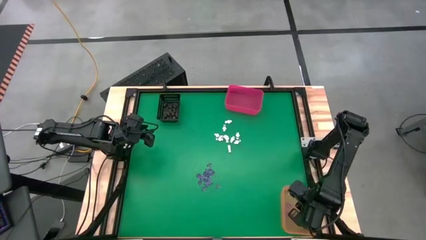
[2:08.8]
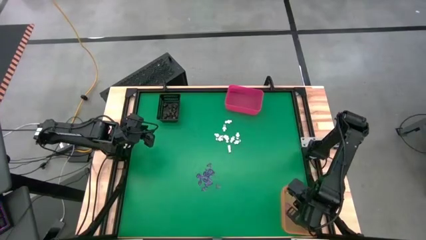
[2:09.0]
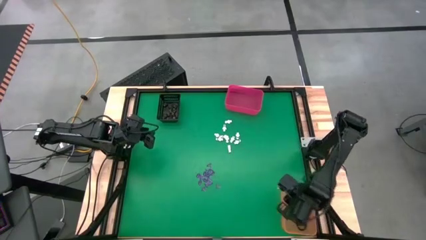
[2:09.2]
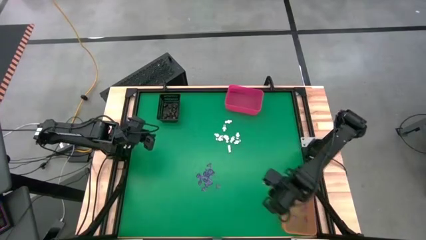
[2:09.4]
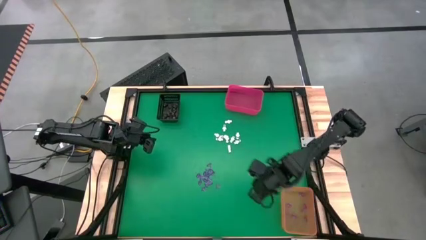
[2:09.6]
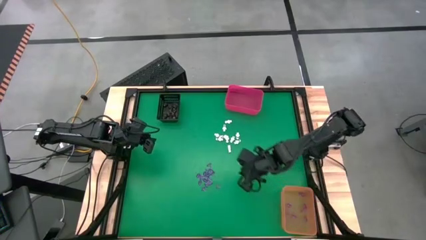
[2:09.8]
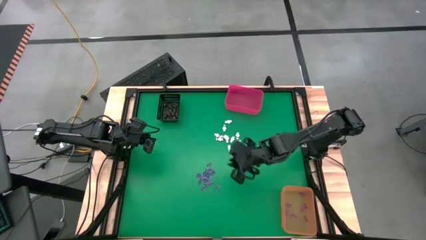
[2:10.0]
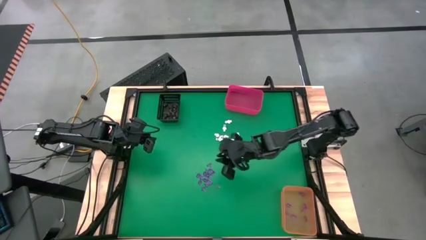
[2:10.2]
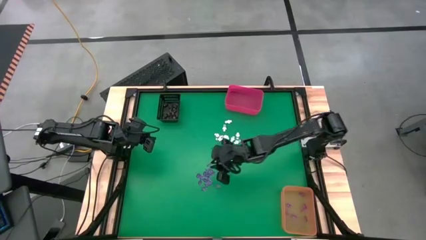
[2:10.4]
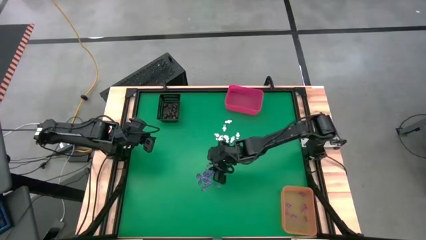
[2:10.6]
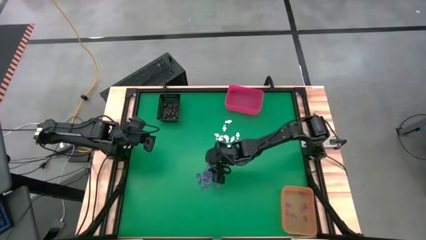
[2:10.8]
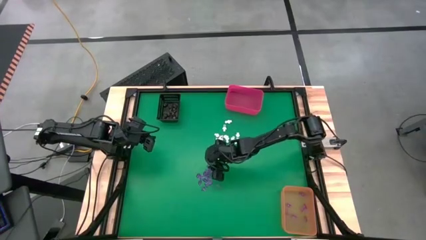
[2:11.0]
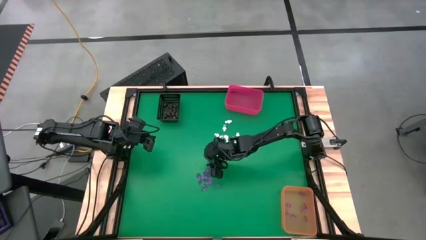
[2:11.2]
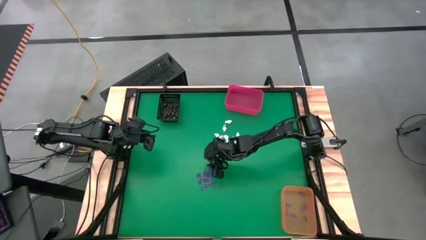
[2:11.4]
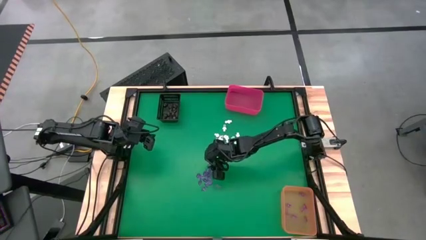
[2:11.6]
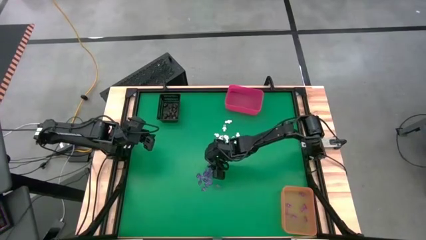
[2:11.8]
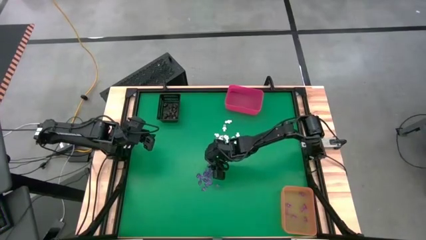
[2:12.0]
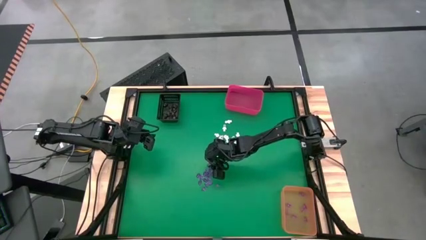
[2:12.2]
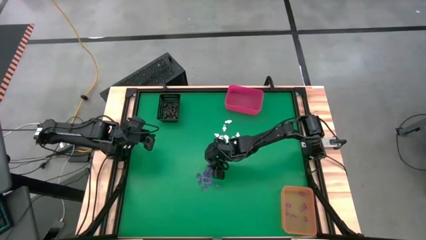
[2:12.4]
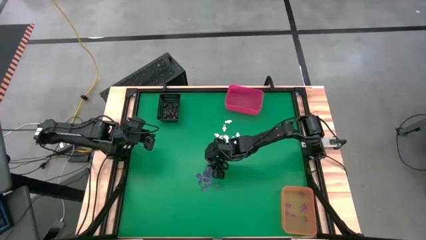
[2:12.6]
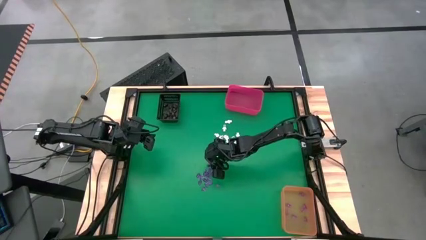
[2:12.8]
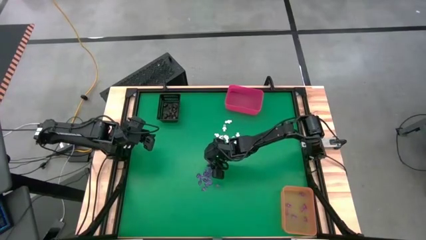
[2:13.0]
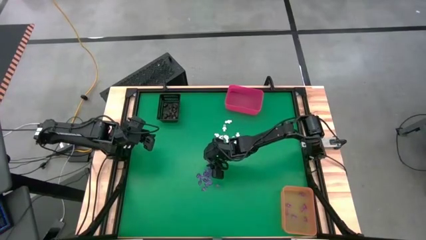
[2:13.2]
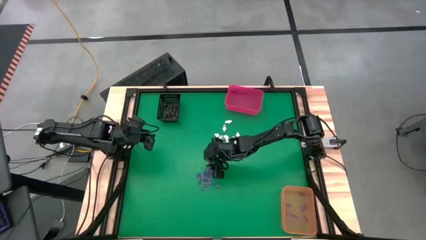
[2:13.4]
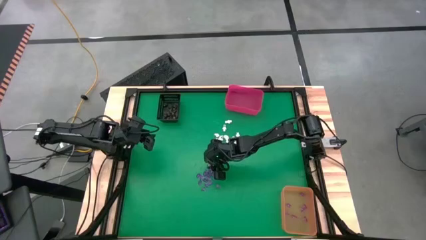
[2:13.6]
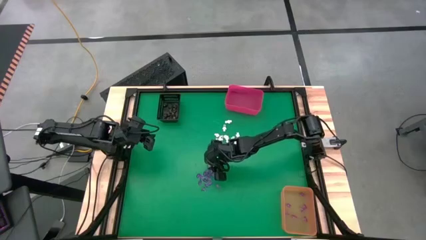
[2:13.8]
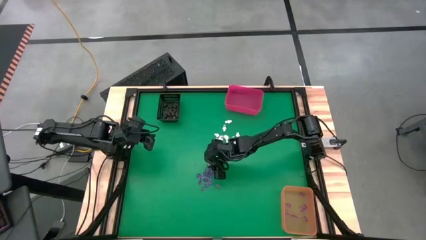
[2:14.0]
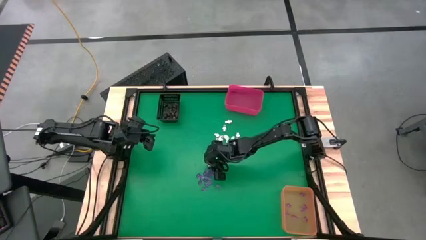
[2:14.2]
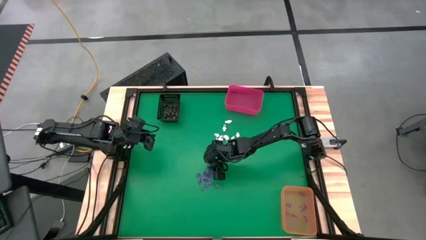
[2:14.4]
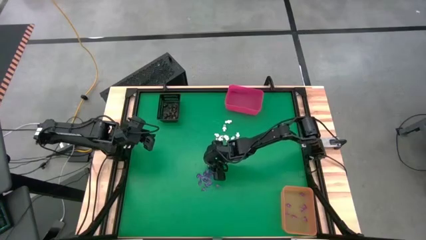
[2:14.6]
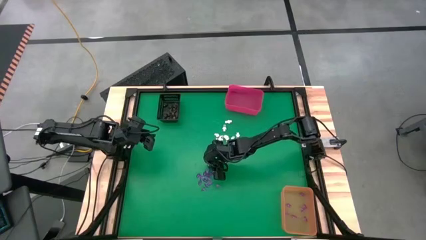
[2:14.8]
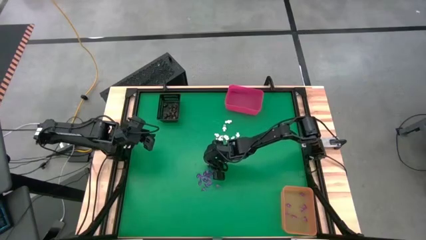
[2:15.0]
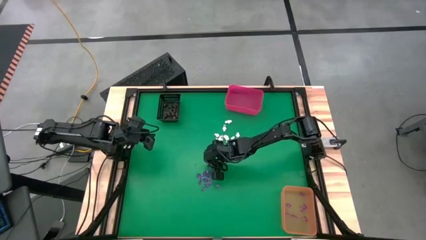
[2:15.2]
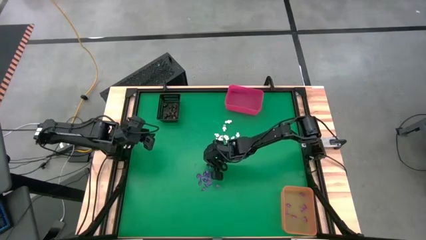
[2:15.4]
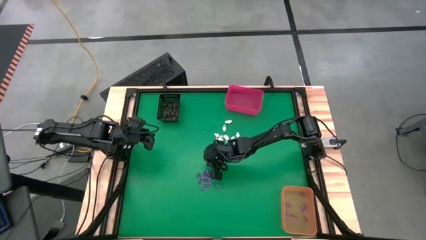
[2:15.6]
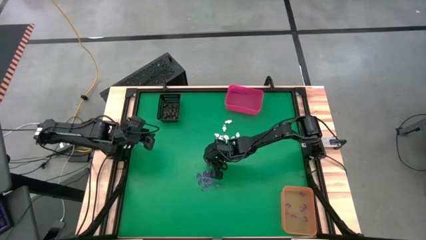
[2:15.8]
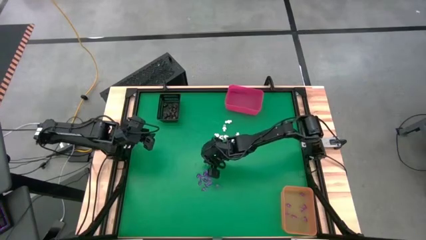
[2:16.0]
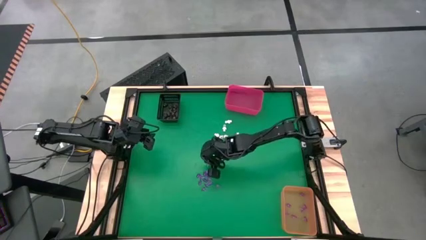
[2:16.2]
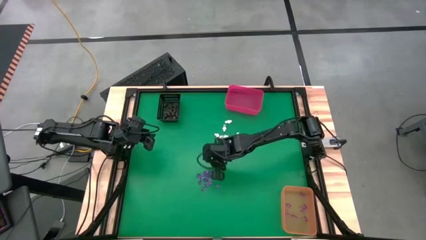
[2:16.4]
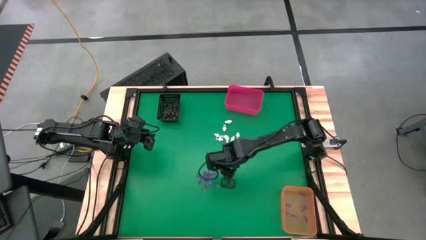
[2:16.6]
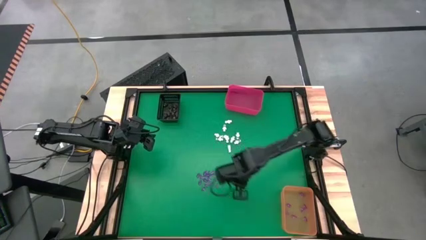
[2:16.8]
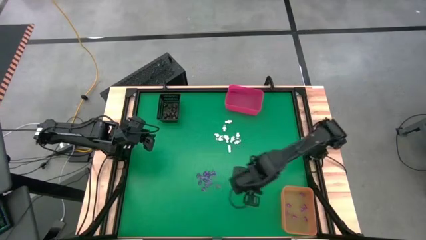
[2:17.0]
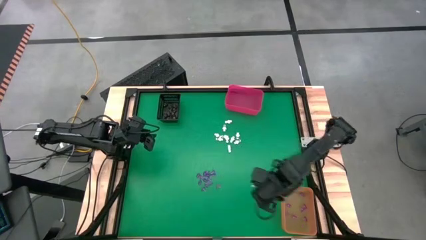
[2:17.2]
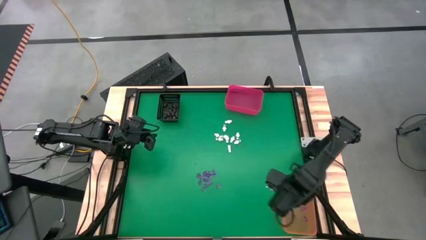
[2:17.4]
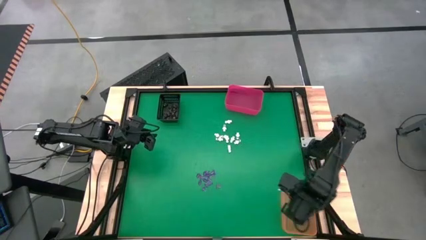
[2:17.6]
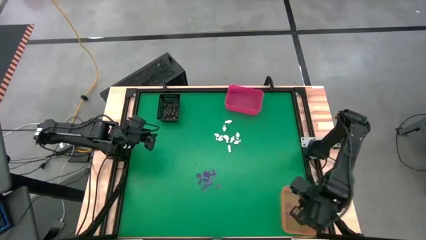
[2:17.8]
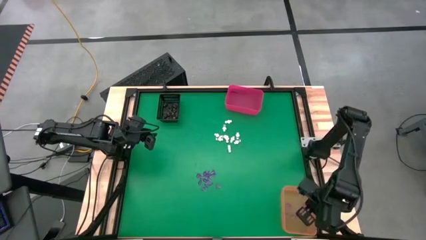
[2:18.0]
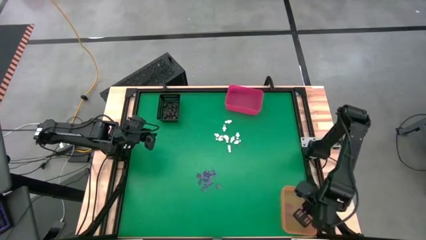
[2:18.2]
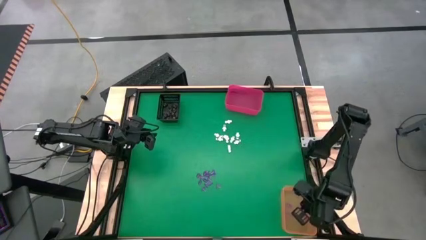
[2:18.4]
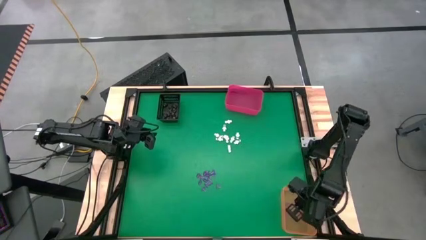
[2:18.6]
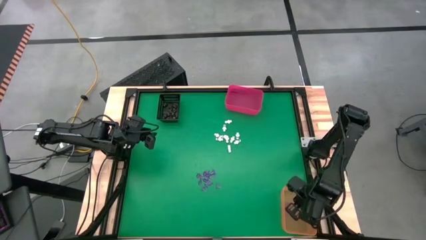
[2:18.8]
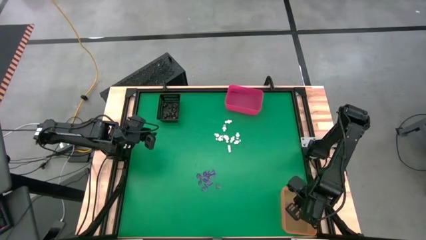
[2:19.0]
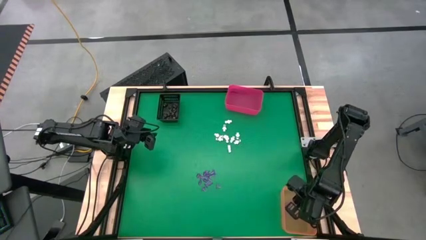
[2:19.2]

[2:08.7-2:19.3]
Task: Sort Halloween decoration
Put the pink witch hat toy into the orange bin

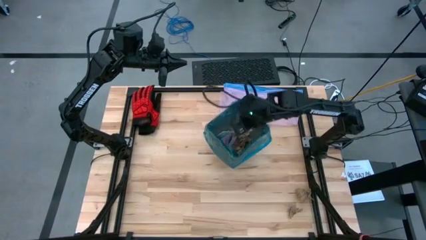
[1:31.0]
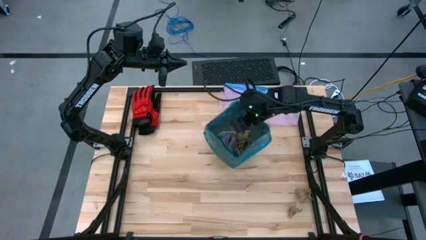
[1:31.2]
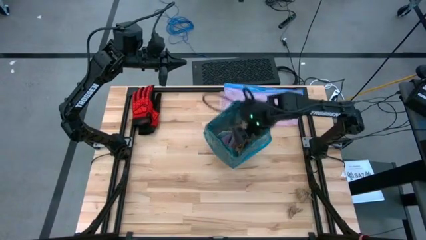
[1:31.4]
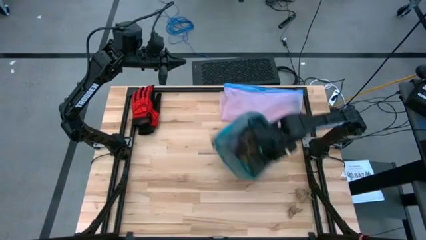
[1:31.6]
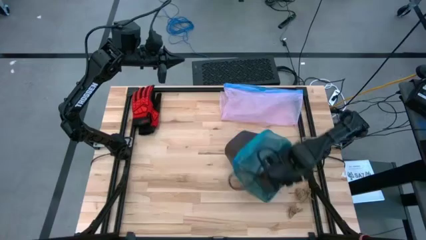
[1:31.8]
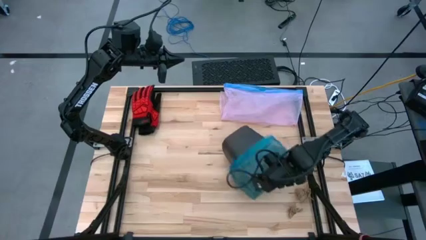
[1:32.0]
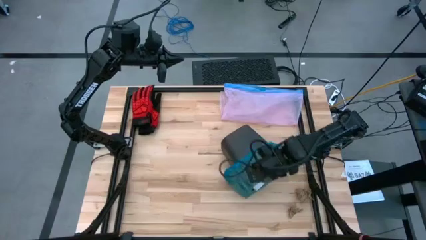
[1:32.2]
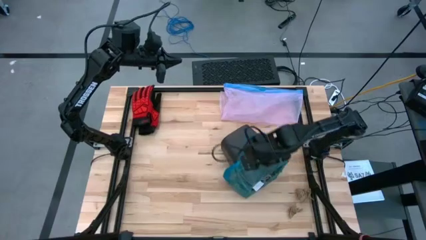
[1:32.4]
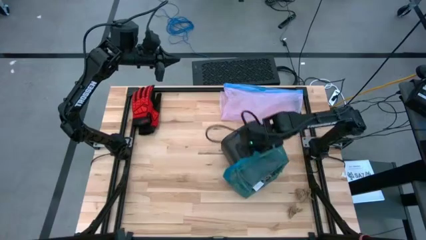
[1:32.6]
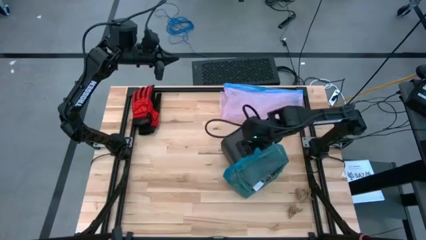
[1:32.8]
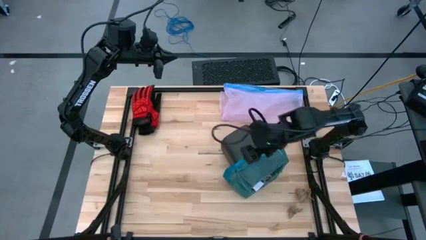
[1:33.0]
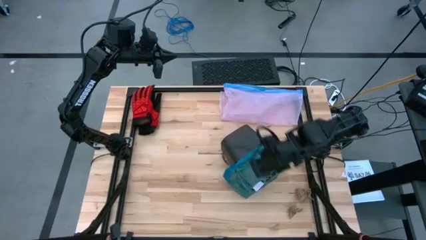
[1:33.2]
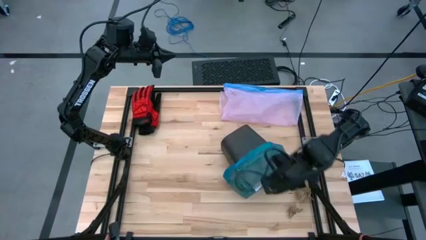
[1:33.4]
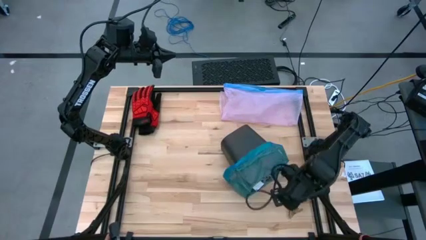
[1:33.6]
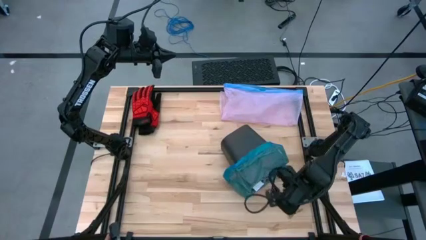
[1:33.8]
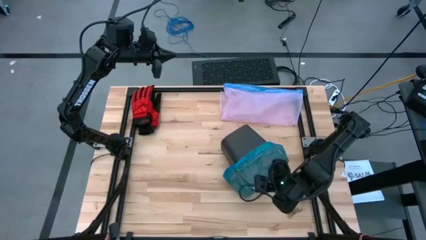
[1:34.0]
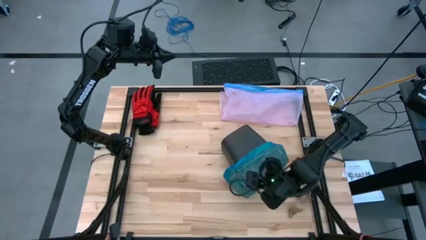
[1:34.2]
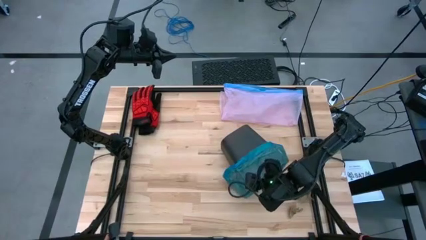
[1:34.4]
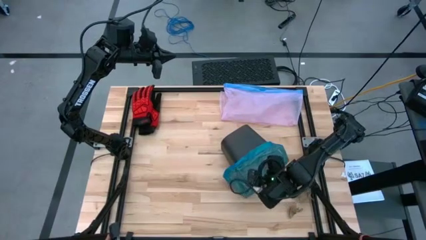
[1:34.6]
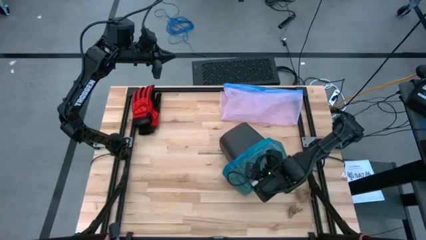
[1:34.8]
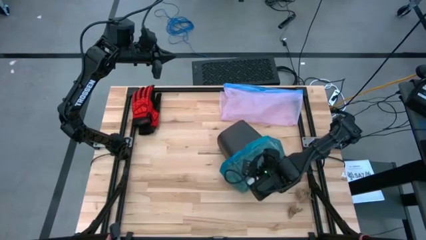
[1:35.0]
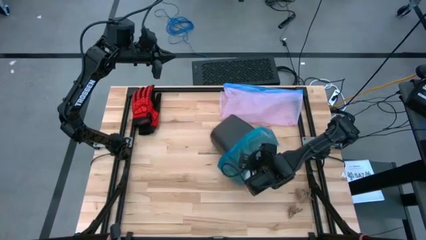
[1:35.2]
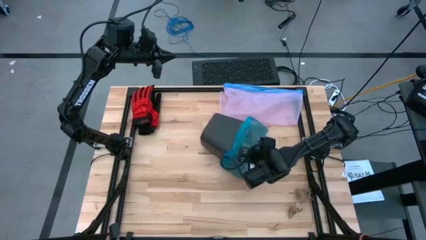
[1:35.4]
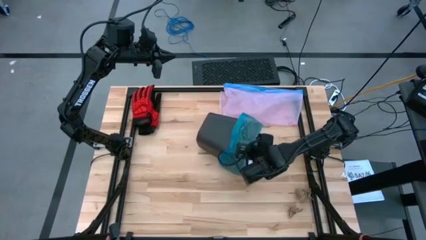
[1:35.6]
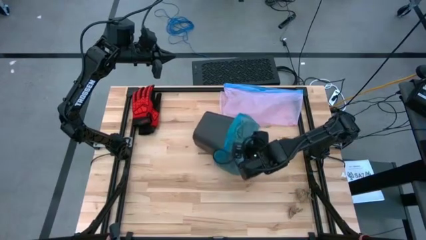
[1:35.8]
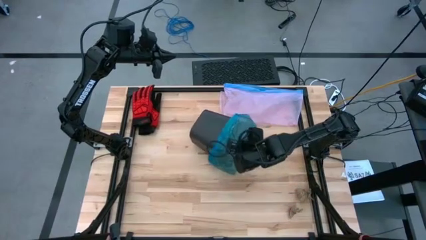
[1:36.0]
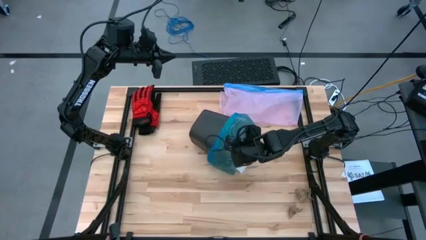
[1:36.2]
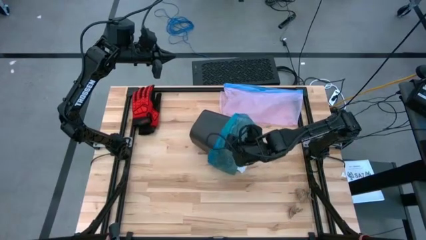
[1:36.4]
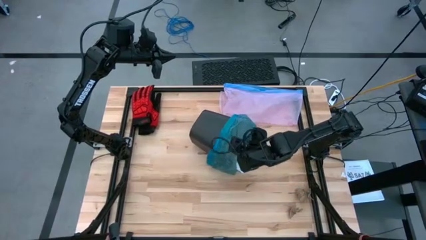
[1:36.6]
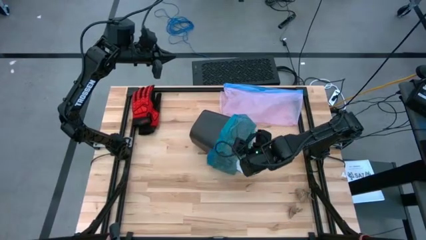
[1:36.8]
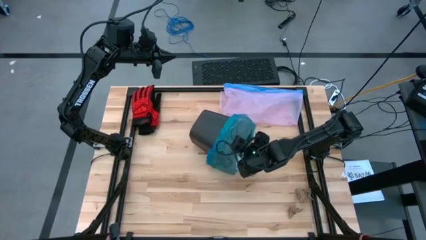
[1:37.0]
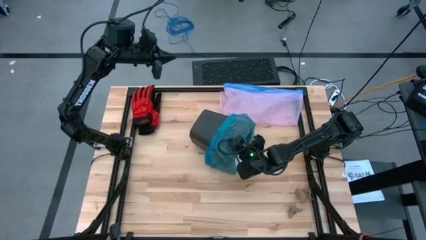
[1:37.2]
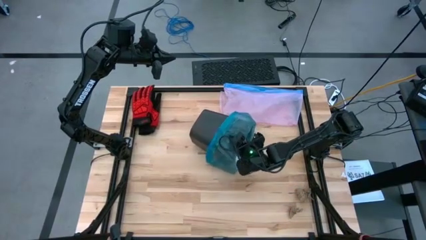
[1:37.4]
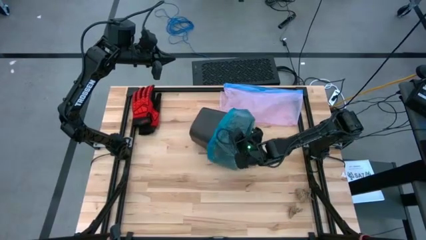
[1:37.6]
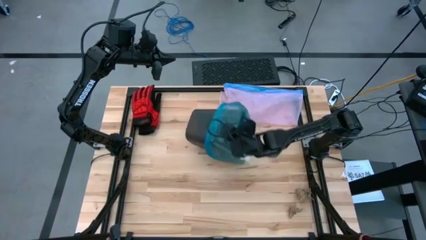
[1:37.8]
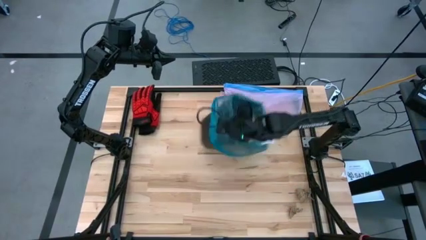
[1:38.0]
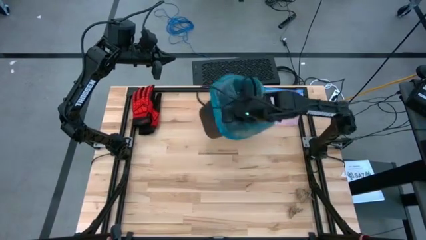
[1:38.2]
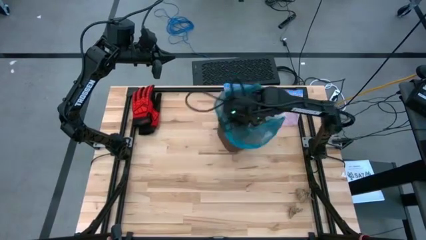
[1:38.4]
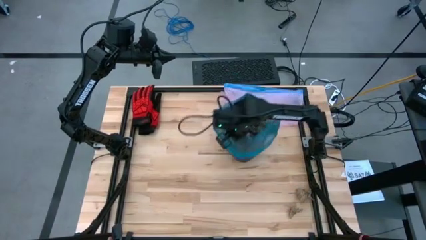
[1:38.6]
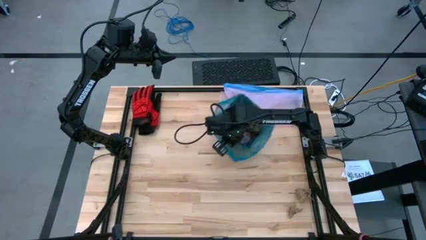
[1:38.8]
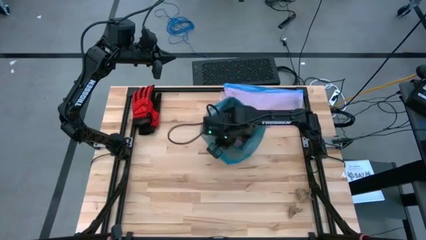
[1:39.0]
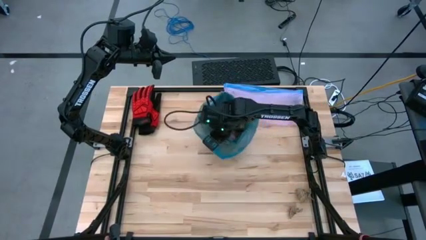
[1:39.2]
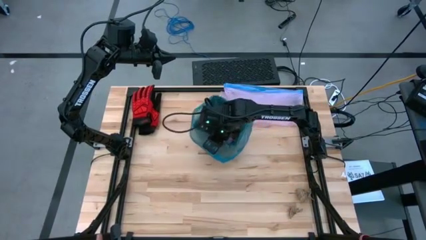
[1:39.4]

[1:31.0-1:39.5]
Task: place trash/remove bag and relplace
Put the black trash bin on the table upright
